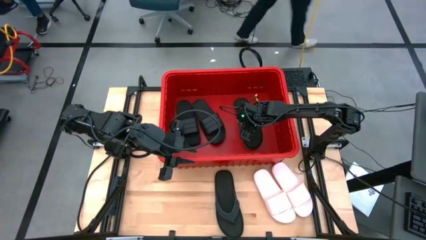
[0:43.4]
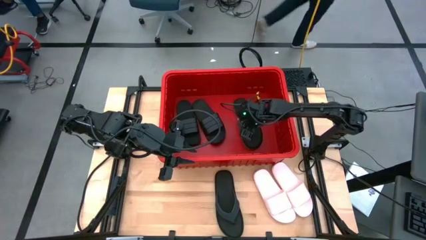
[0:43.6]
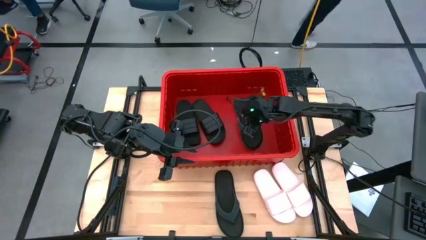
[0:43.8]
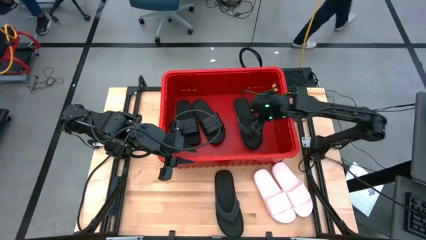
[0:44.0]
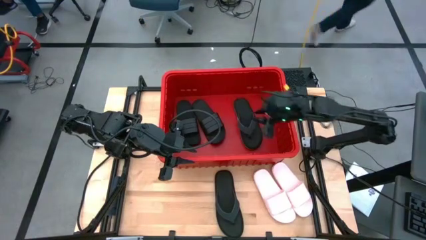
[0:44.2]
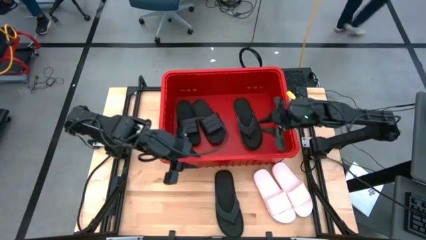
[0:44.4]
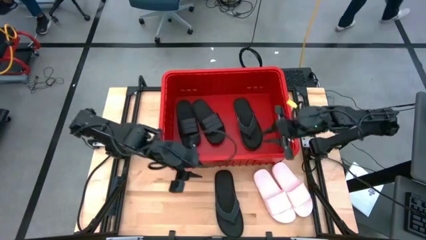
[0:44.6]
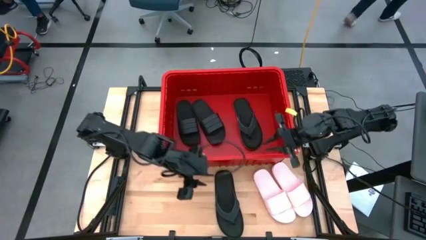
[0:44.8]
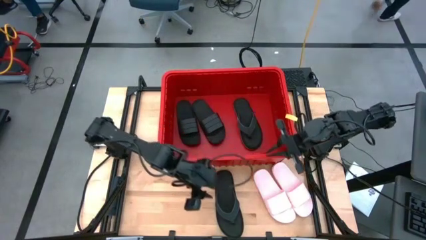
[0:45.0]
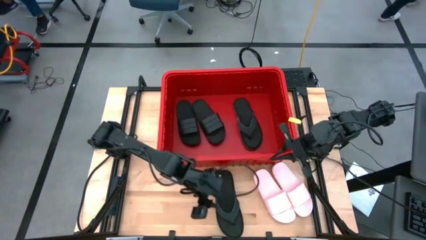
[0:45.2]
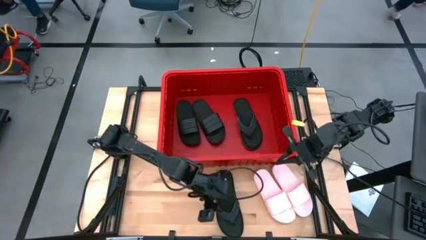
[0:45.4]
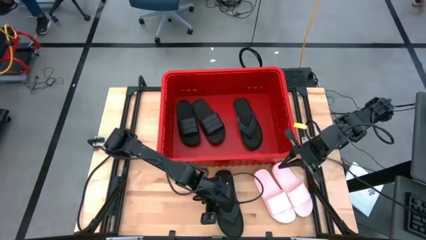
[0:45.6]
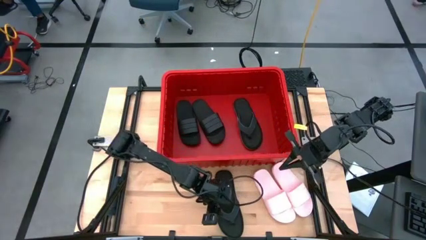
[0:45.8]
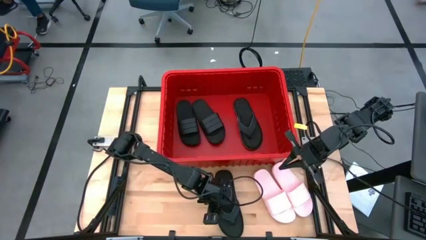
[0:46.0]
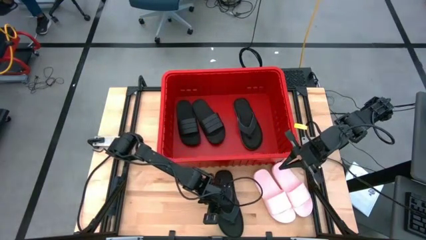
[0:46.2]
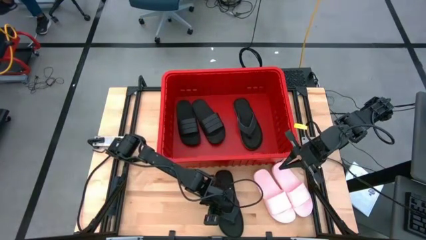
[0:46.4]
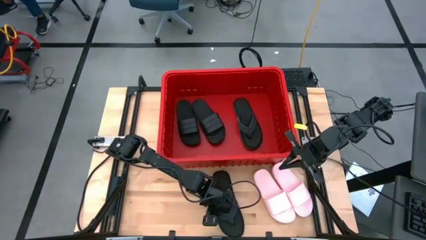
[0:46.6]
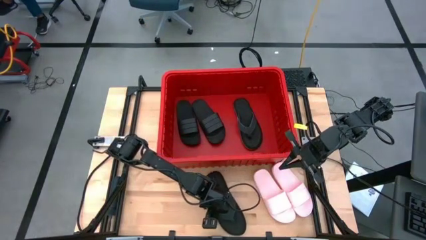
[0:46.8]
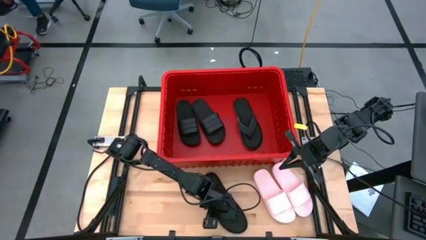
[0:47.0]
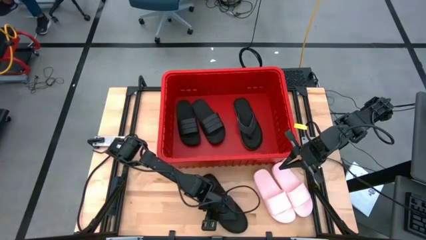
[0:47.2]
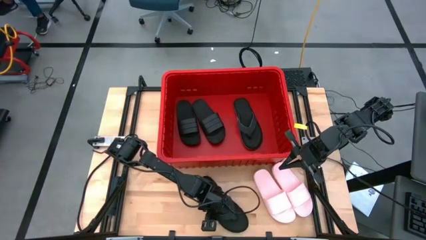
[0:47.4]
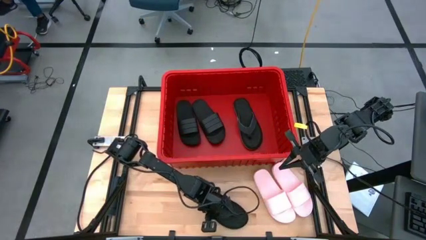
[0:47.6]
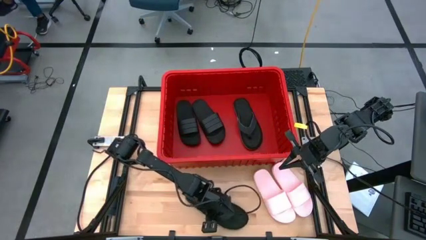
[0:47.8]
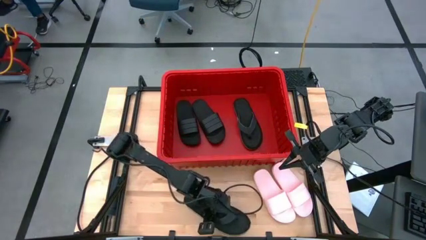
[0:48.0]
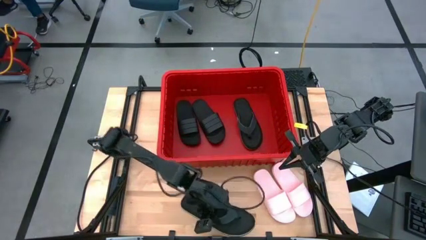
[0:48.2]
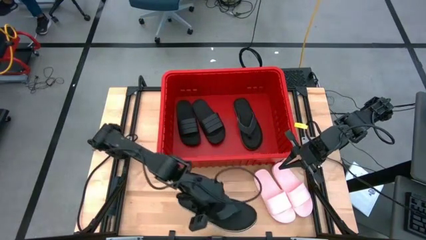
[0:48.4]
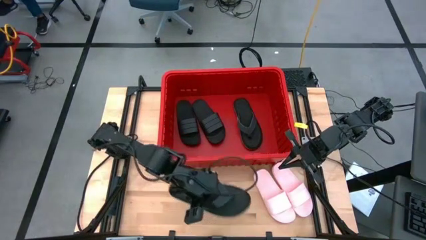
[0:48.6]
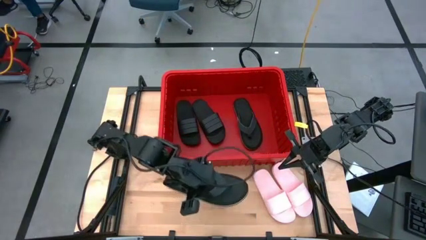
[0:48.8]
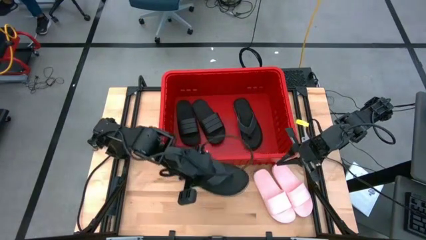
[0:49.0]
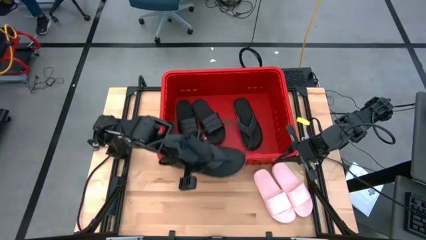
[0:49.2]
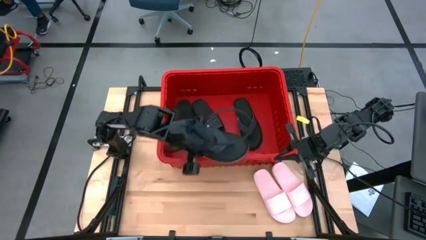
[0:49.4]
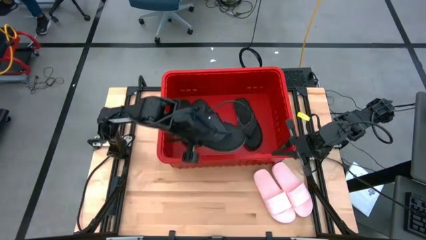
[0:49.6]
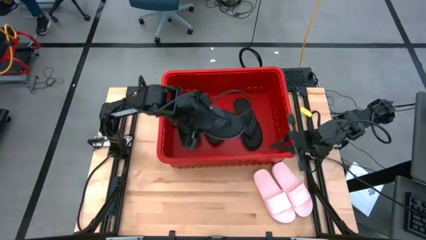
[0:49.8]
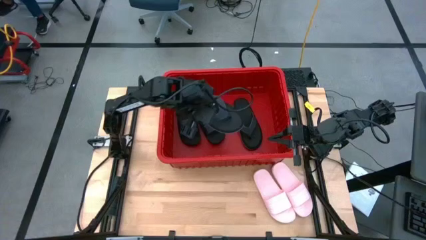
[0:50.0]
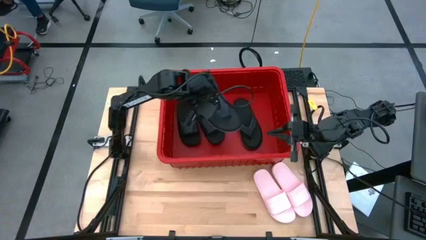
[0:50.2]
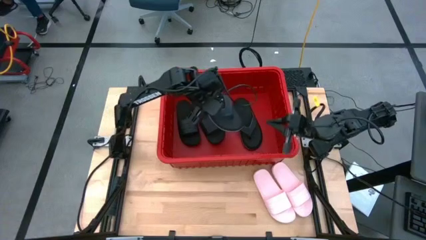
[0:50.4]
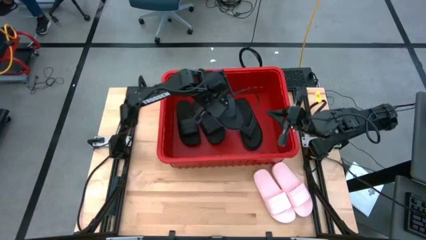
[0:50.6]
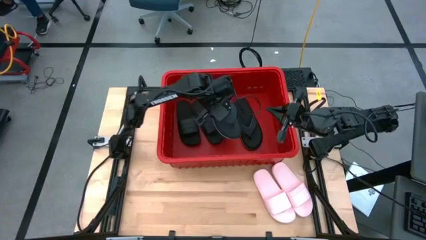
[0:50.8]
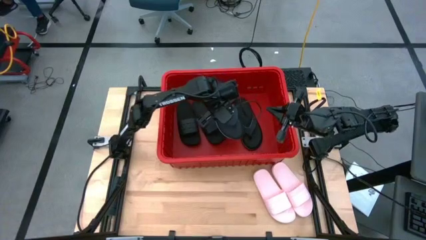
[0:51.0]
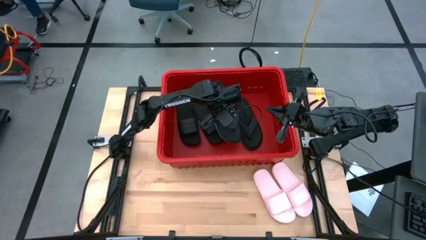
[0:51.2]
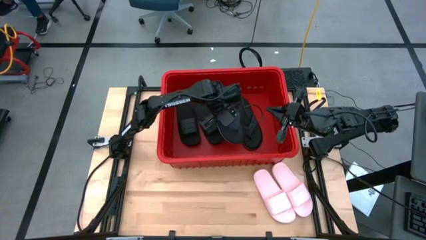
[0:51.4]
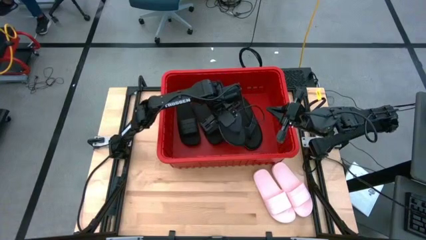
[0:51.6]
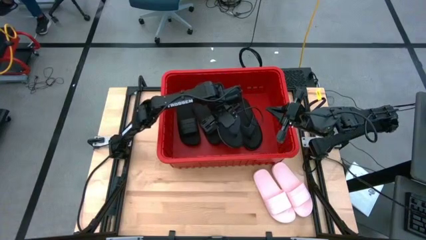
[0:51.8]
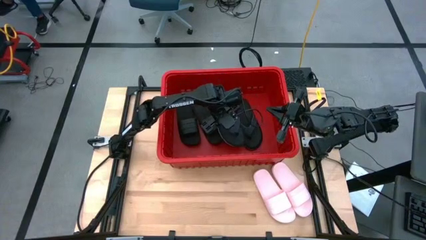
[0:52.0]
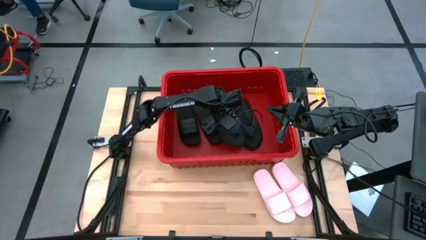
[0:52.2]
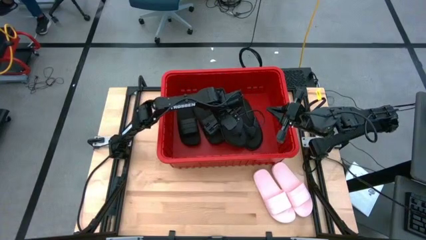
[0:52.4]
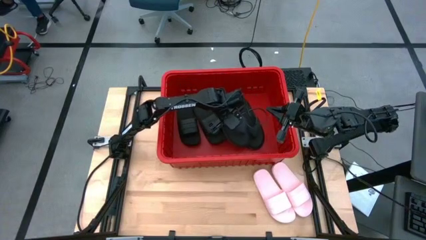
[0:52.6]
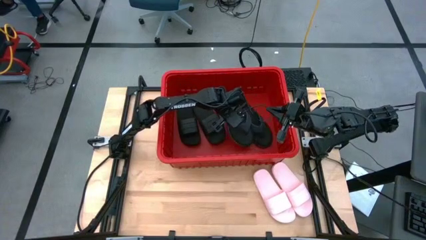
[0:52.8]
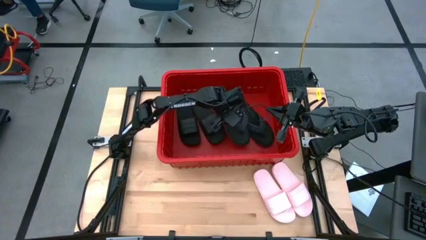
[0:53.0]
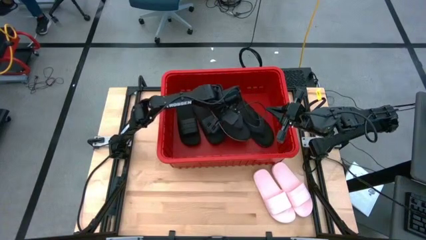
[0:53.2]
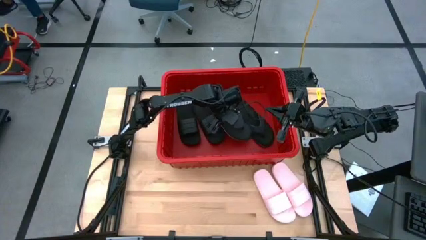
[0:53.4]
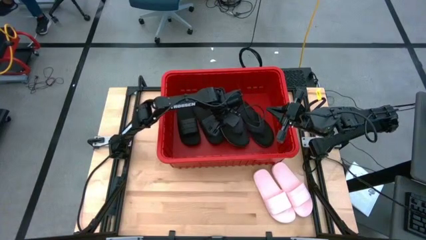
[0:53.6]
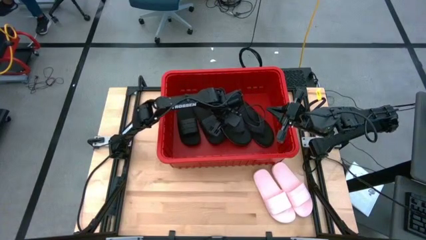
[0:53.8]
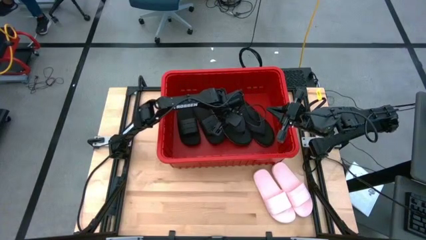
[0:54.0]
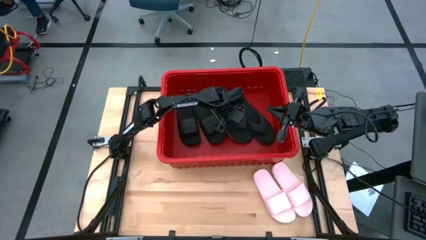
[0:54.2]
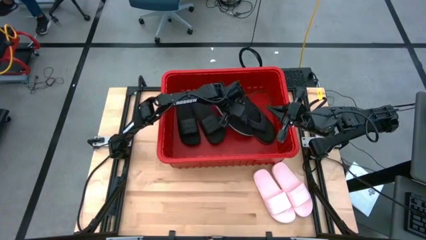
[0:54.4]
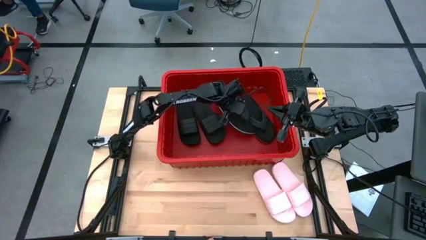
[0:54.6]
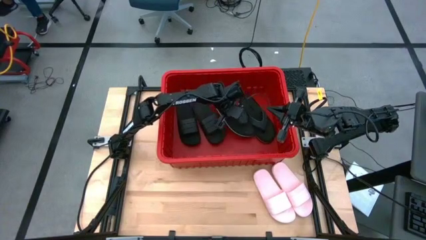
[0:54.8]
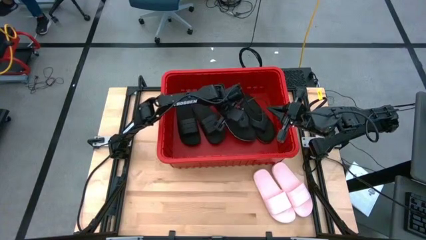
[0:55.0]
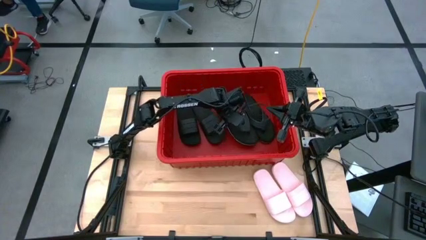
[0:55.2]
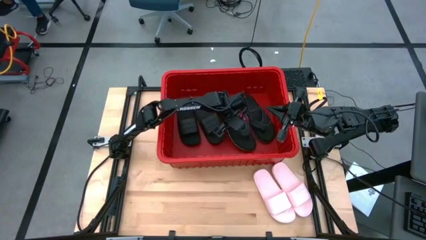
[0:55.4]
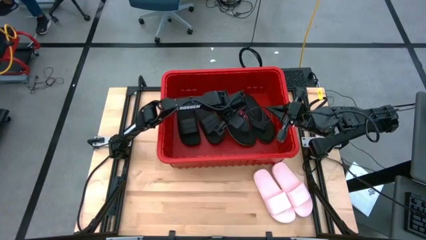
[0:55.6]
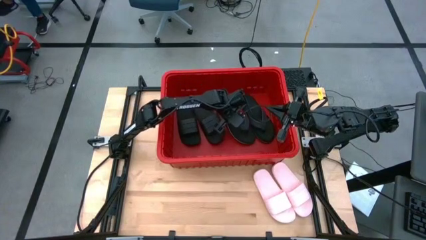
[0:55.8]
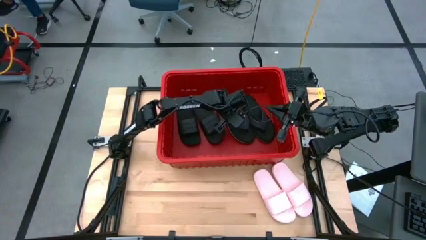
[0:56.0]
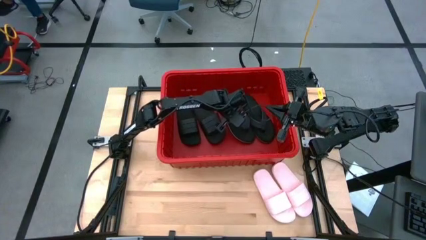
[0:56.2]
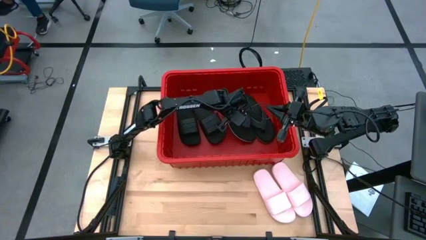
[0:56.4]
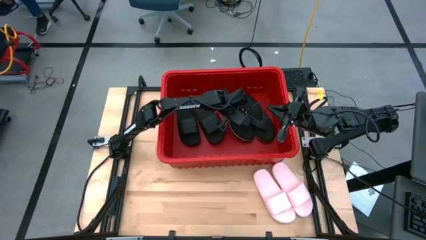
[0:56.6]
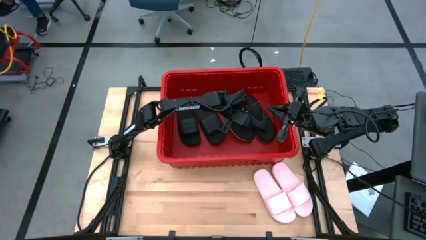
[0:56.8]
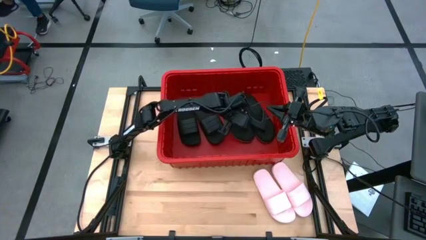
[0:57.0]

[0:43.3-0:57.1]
Task: Pick and place slides into bin
Put the black slipper into the red red container

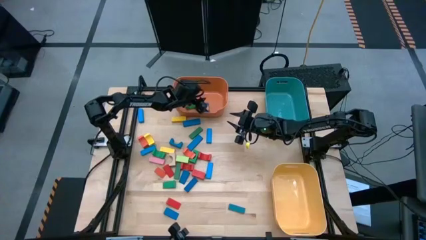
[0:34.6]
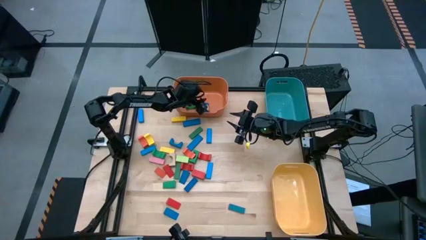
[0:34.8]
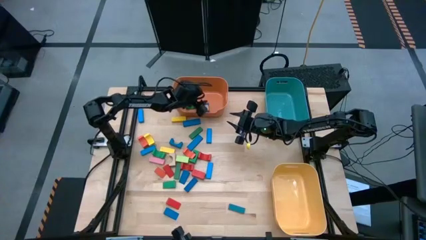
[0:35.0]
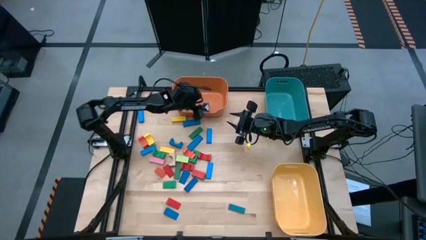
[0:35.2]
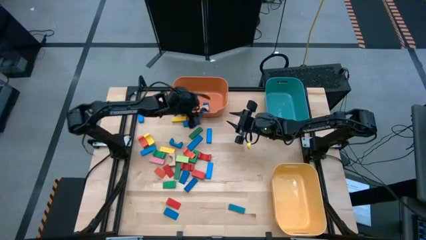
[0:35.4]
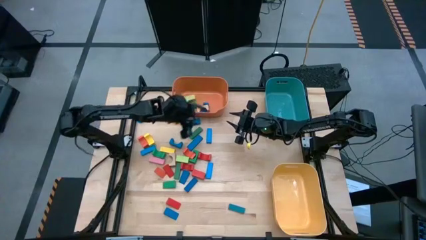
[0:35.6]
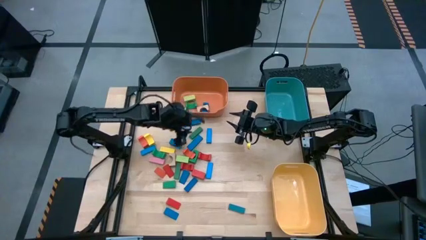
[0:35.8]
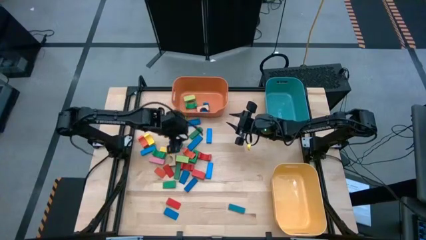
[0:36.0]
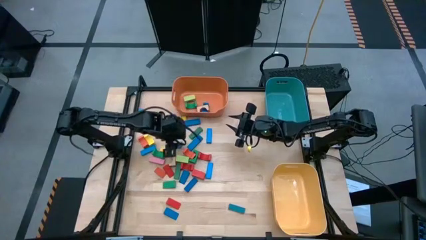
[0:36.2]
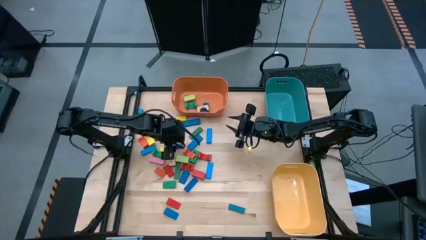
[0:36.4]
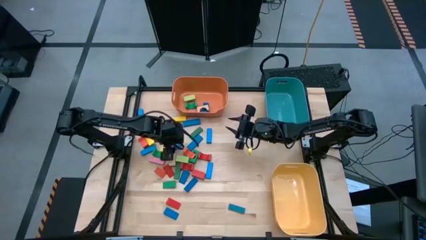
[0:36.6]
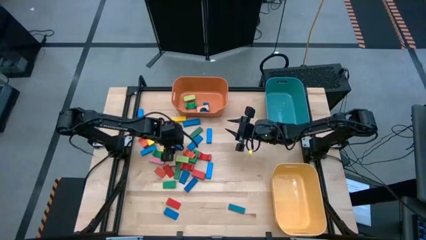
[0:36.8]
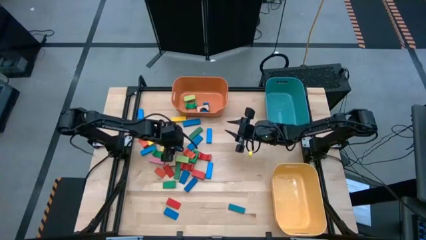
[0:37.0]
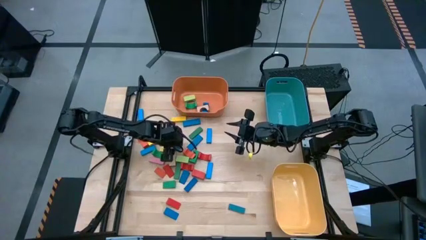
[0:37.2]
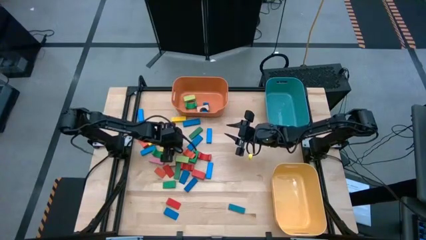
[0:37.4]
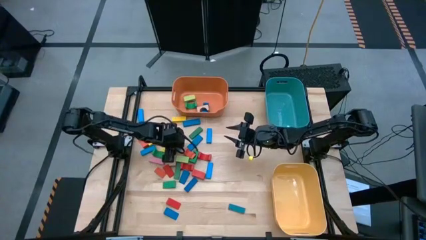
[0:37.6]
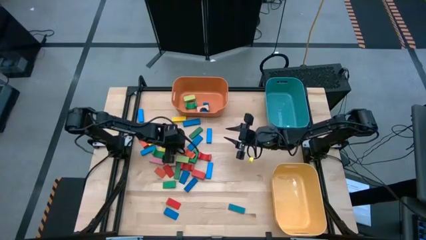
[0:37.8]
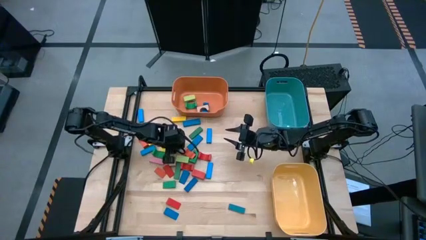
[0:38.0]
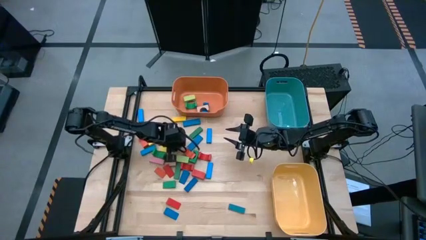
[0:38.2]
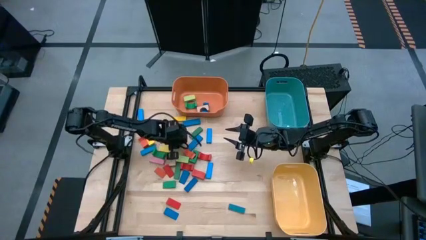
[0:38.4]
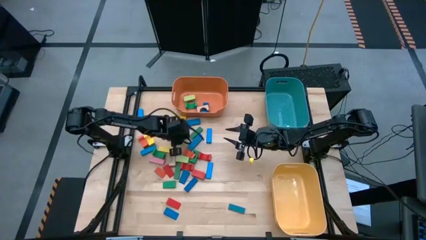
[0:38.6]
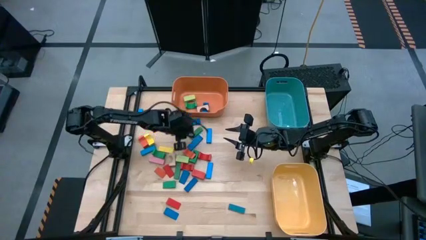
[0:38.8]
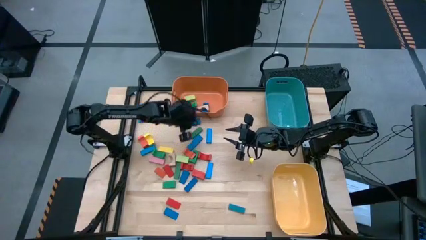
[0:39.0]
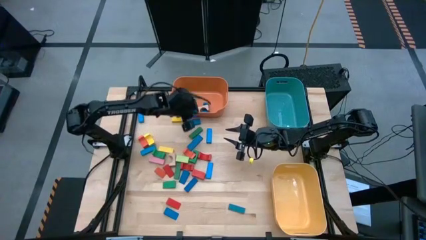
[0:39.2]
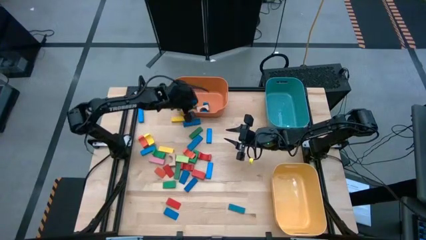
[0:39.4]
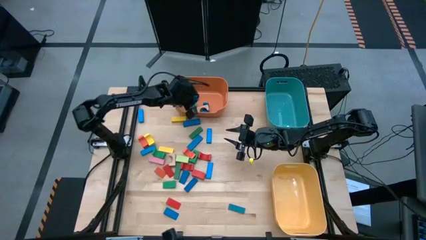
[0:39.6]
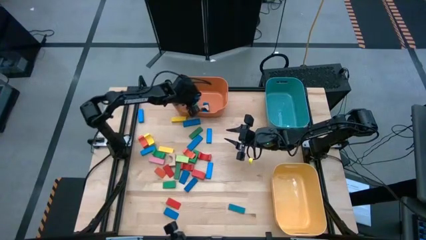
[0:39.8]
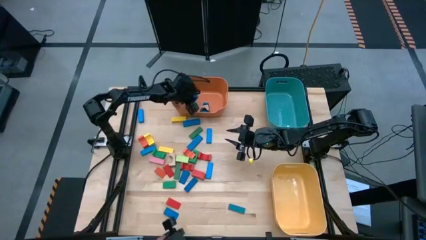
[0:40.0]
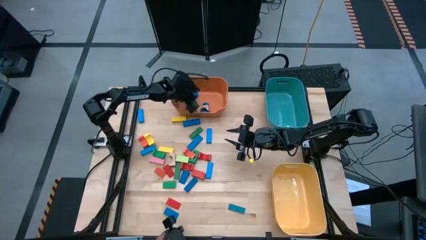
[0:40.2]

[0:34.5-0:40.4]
Task: Sort blocks by size
Put the blue arch block into the orange bin
